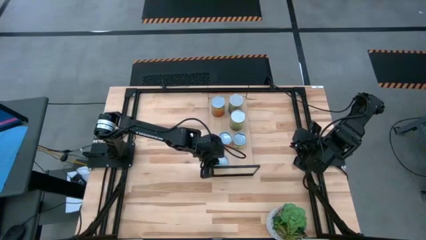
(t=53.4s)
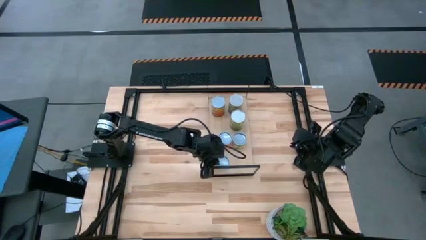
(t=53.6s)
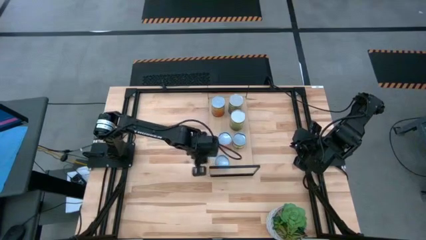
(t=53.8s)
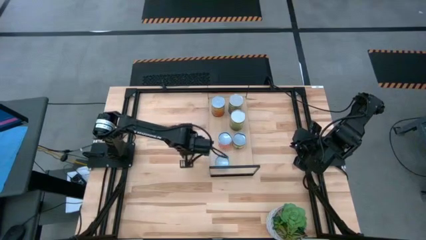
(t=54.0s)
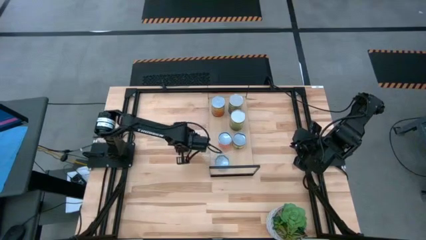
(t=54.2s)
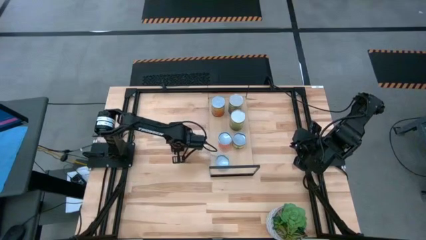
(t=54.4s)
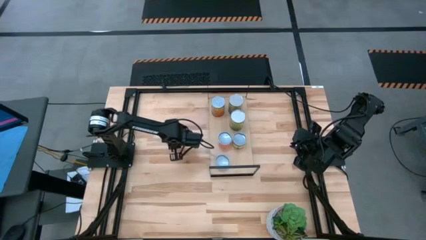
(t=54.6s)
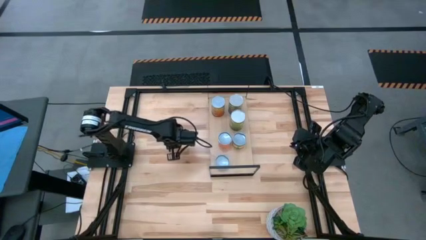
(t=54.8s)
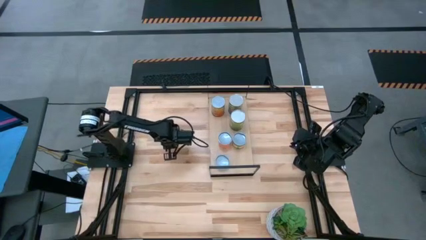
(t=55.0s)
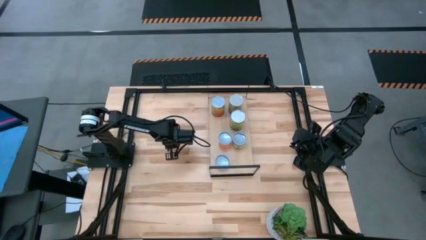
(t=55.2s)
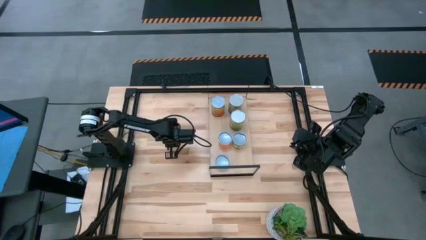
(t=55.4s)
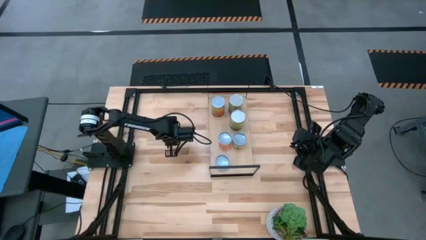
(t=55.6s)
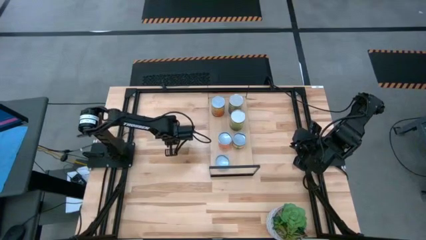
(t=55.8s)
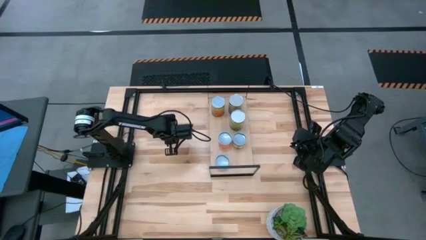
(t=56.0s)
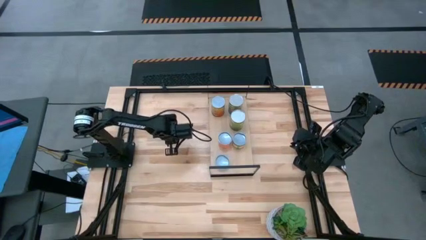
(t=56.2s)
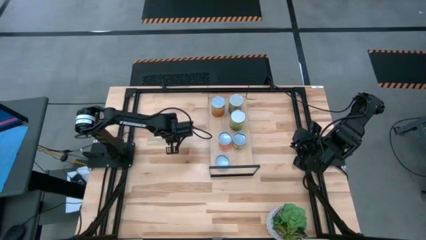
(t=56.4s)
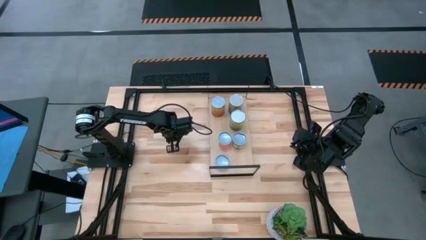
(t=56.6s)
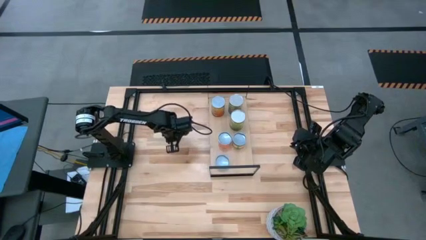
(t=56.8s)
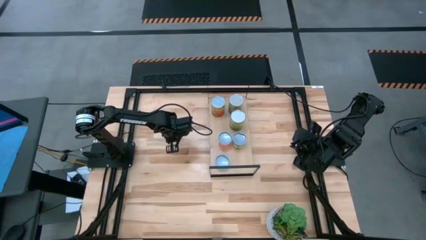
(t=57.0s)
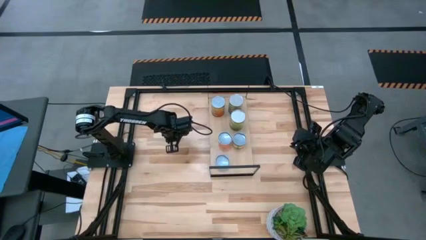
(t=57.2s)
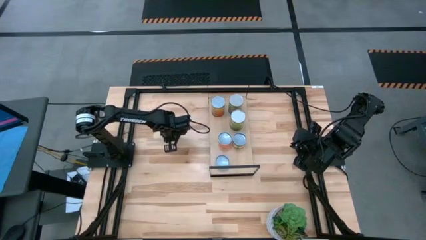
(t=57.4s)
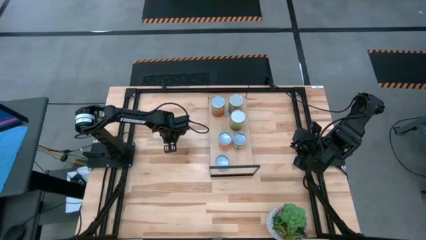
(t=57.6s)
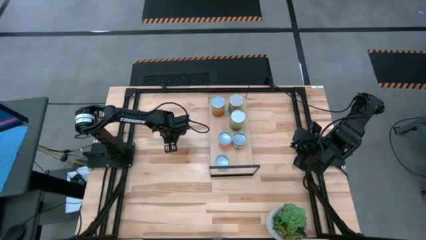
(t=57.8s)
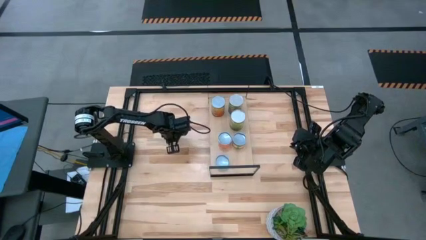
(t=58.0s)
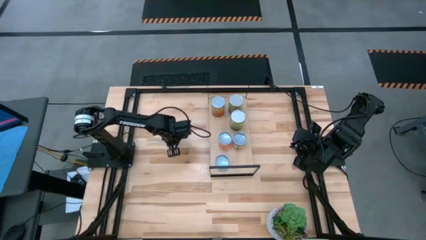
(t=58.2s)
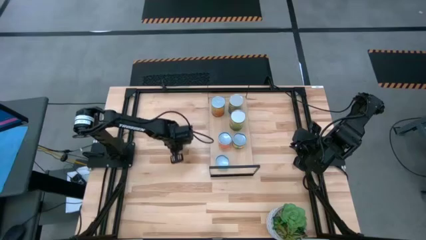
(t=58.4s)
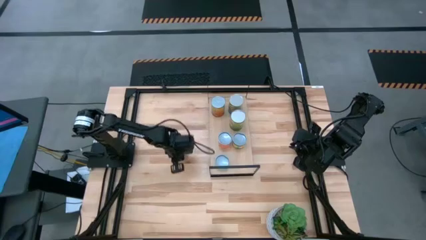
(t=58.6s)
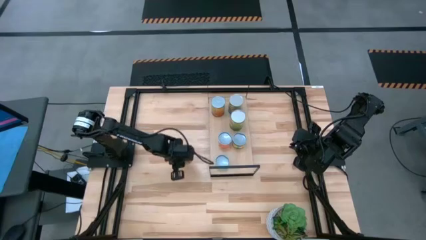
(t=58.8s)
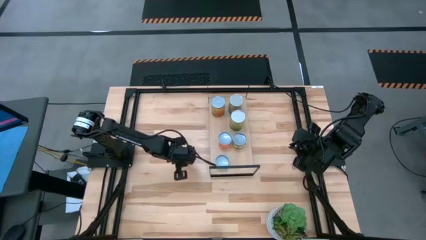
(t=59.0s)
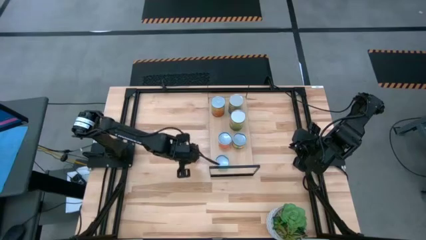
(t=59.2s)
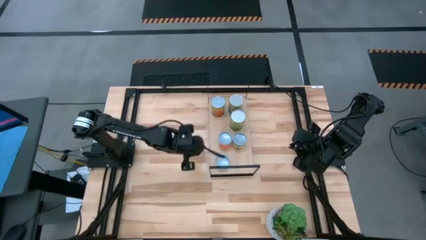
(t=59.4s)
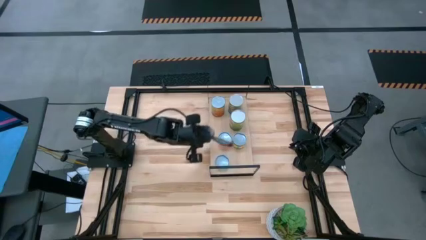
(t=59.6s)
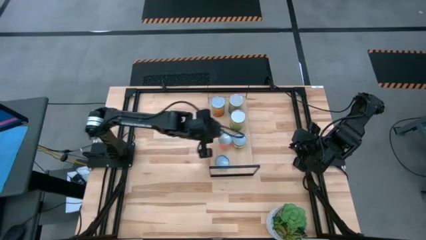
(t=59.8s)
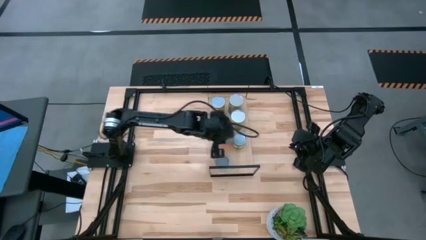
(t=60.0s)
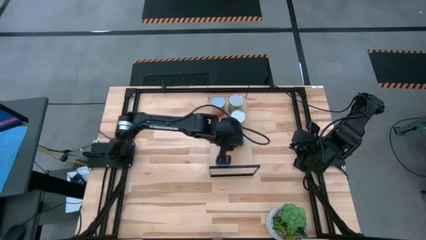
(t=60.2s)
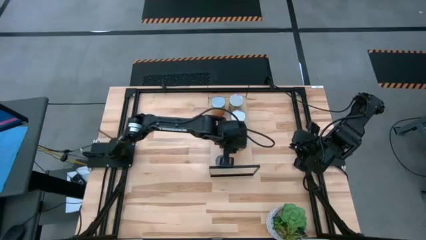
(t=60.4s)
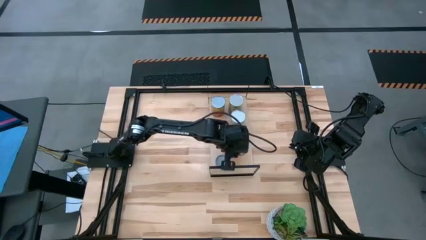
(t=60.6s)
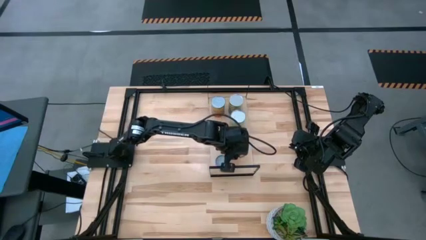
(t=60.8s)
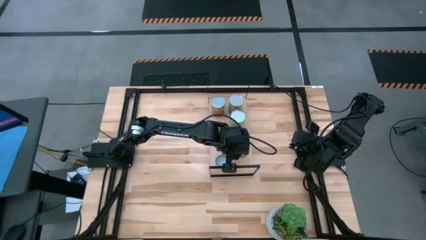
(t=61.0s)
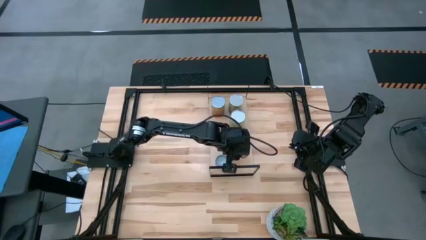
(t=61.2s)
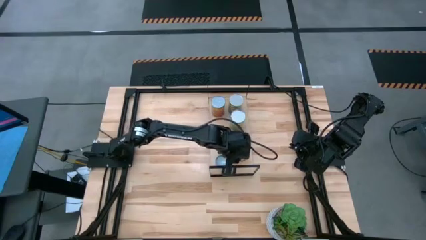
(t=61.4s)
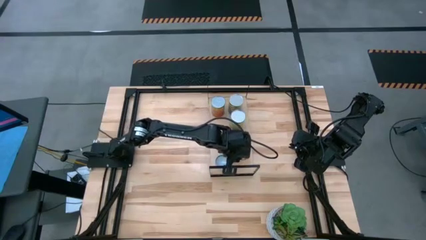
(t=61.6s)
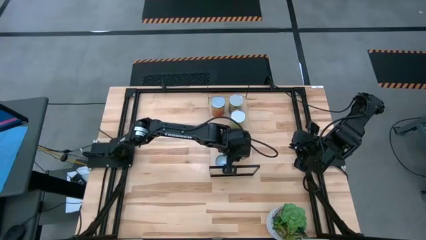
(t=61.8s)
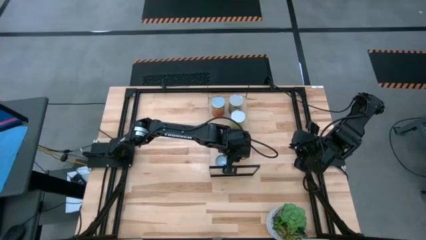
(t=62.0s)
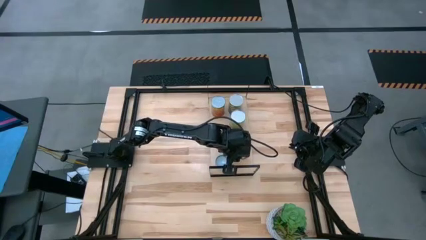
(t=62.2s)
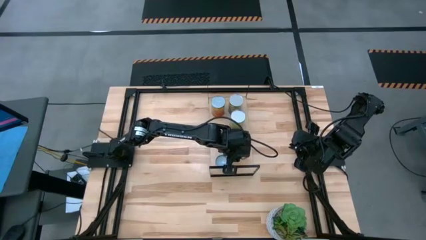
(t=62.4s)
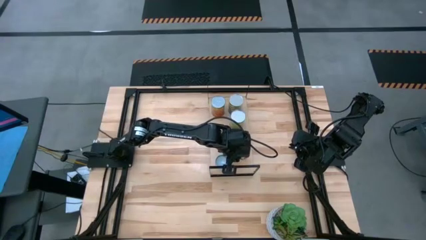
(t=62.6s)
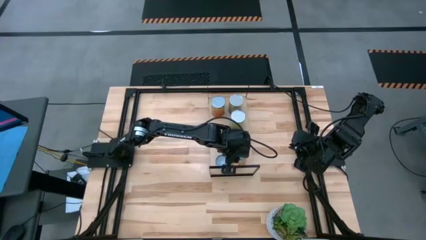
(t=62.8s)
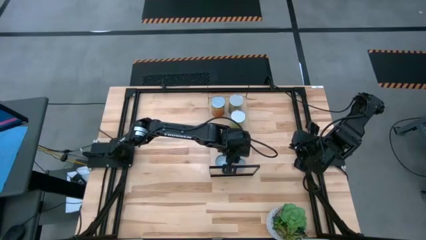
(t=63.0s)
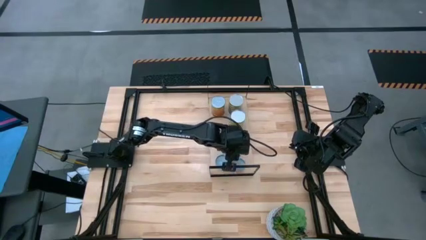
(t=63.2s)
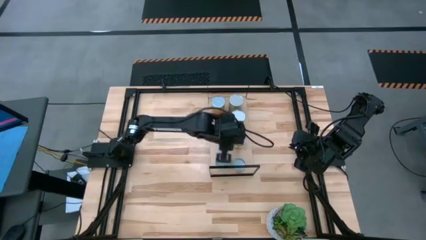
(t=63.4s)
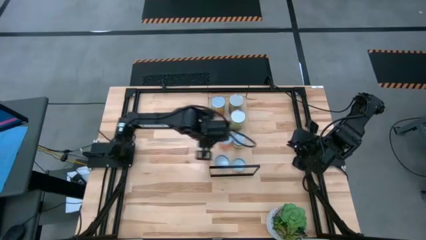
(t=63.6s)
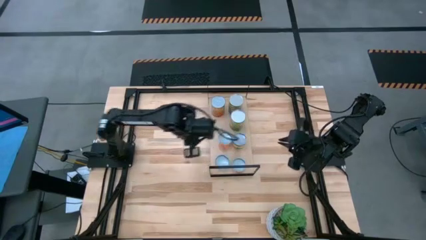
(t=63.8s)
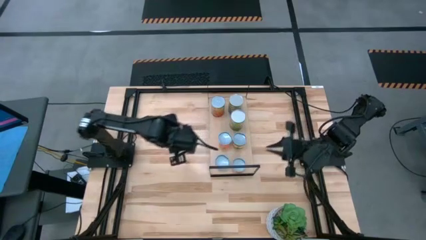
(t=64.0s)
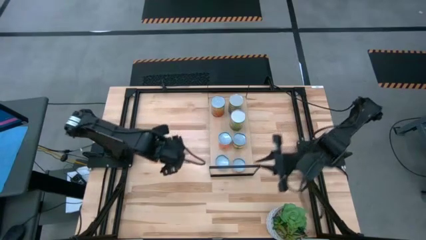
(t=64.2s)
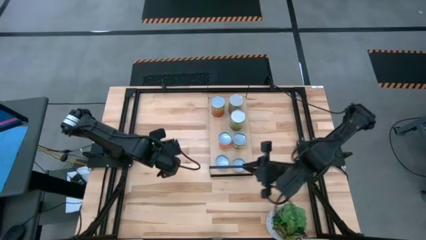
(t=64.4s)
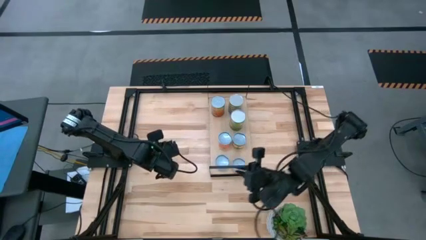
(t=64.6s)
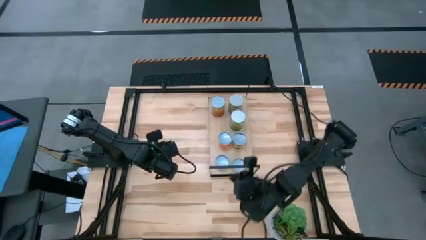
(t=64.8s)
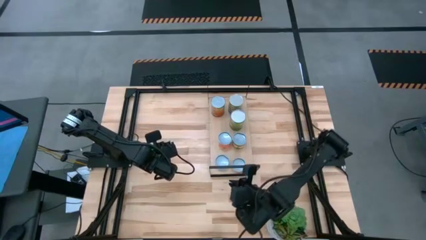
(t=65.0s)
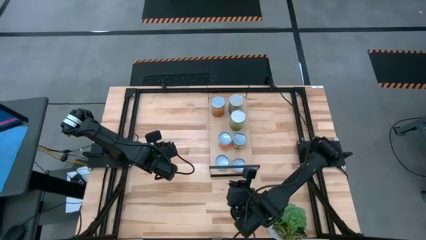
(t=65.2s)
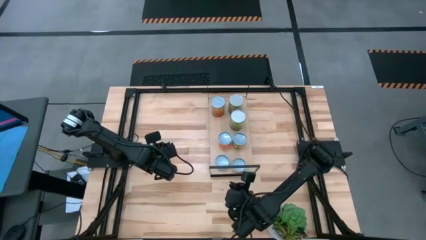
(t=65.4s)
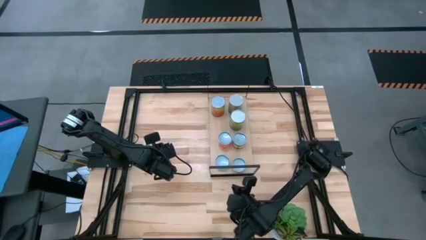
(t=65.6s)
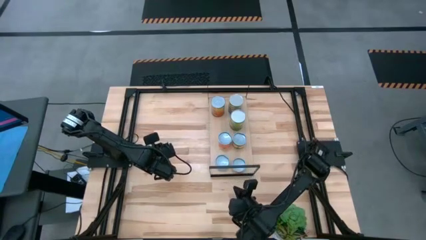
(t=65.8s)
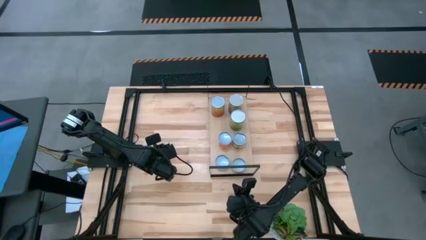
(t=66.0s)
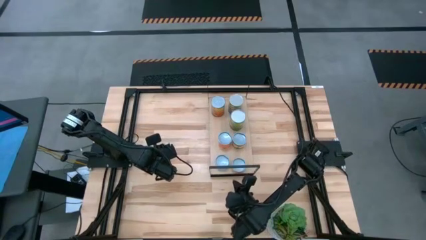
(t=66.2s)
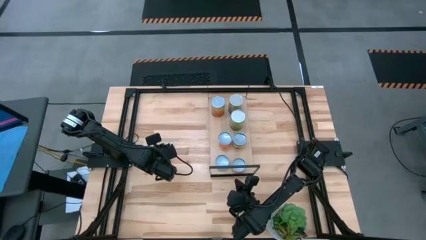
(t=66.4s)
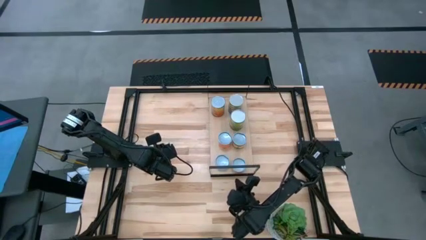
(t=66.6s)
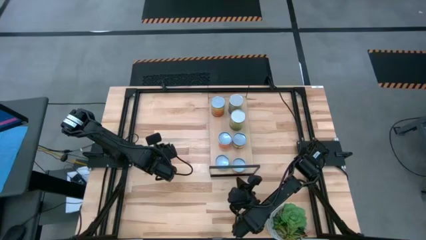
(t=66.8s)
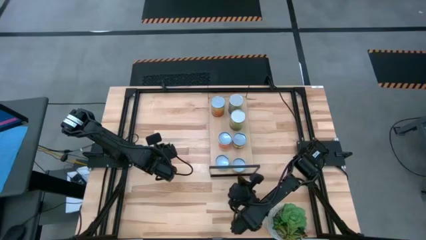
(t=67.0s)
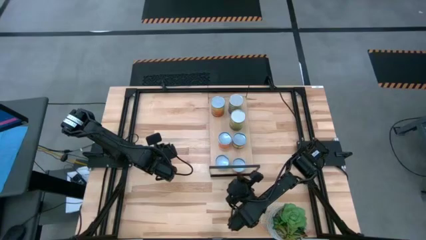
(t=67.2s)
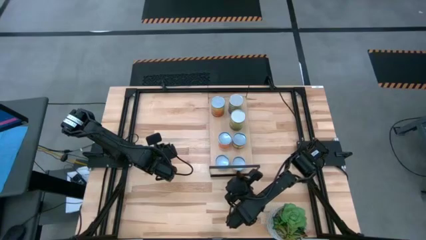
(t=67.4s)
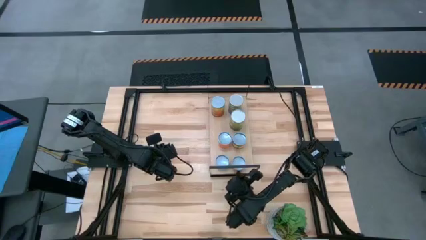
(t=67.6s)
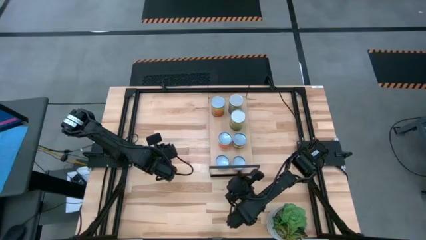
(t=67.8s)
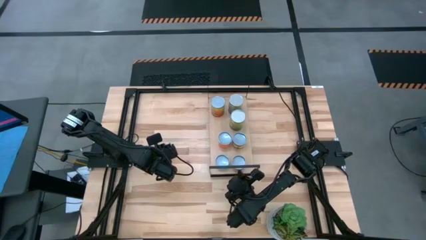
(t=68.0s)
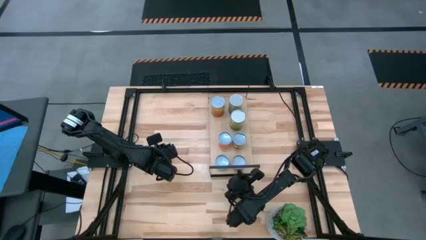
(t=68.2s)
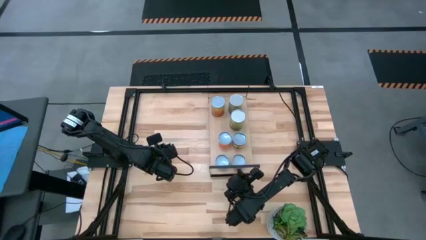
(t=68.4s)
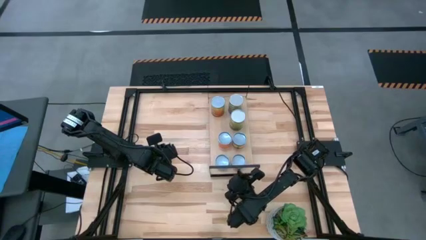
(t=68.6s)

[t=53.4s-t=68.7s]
Task: Pick and place cans onto a shelf
Put the canned pineapple rings on the shelf
